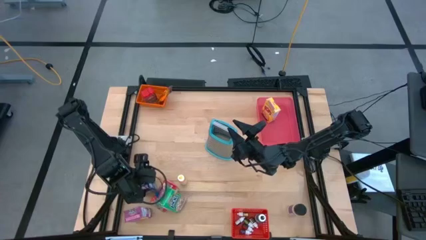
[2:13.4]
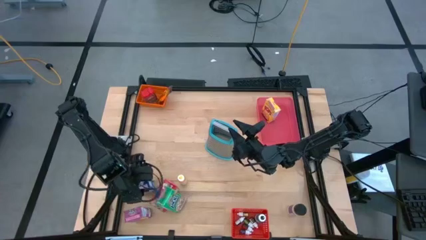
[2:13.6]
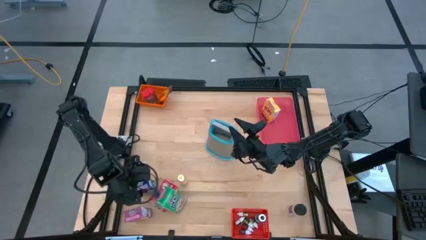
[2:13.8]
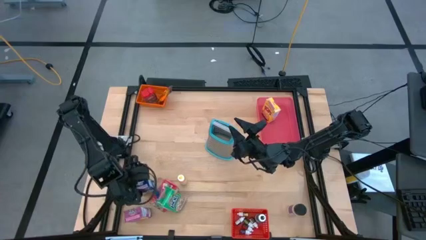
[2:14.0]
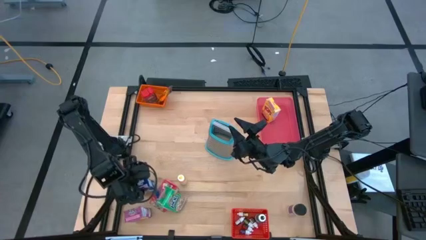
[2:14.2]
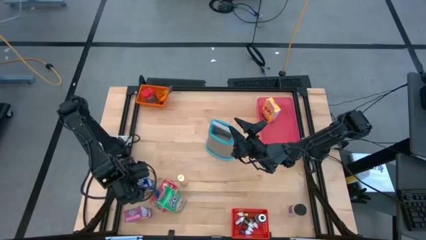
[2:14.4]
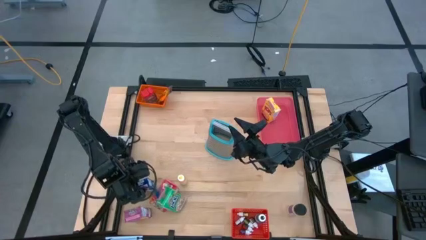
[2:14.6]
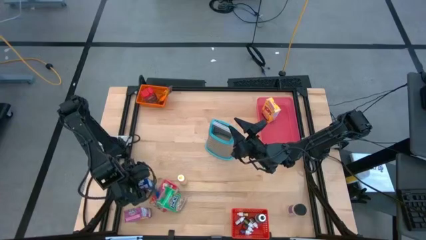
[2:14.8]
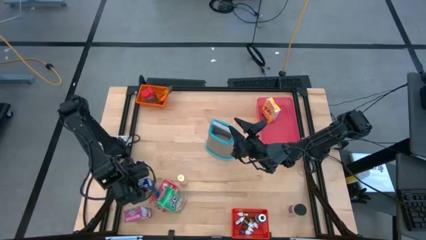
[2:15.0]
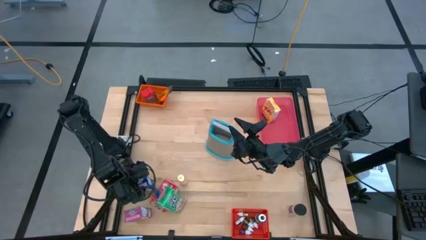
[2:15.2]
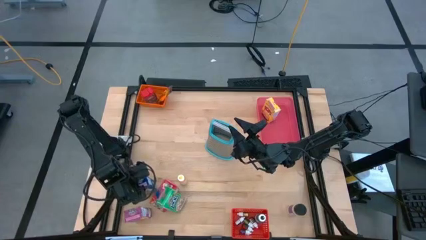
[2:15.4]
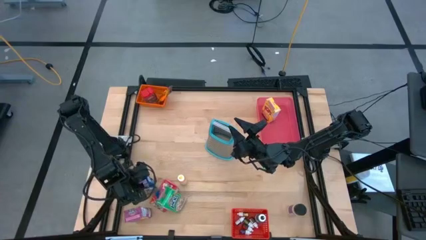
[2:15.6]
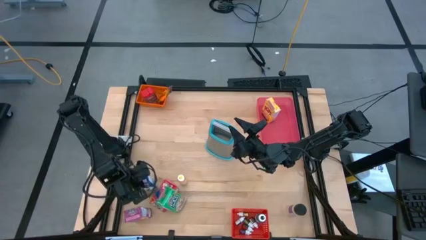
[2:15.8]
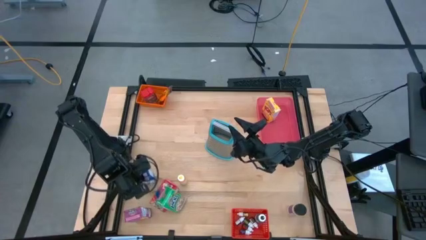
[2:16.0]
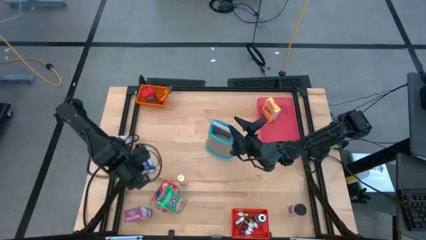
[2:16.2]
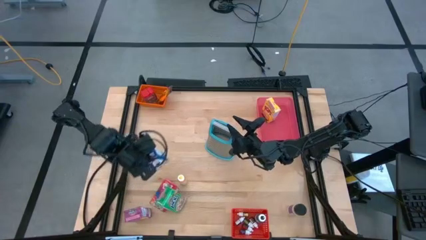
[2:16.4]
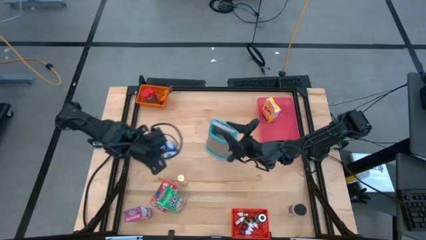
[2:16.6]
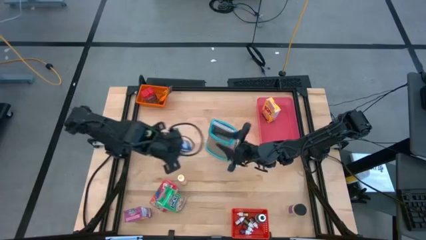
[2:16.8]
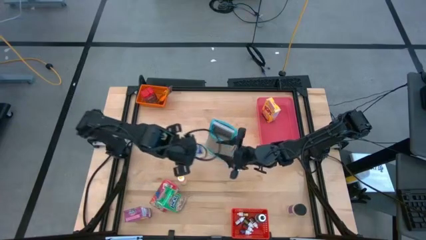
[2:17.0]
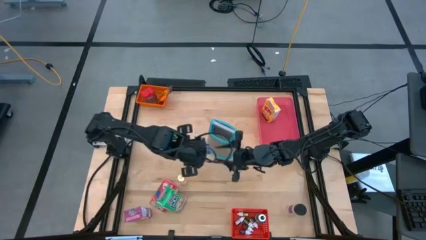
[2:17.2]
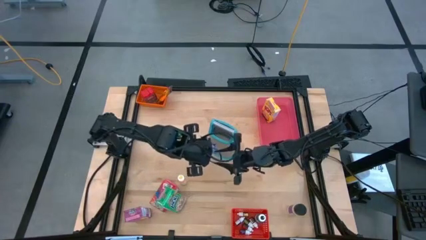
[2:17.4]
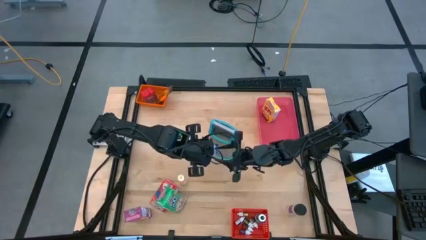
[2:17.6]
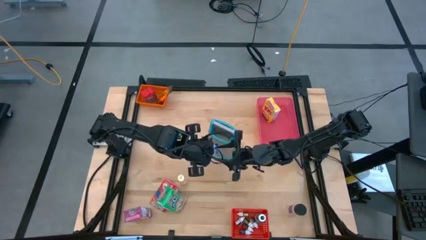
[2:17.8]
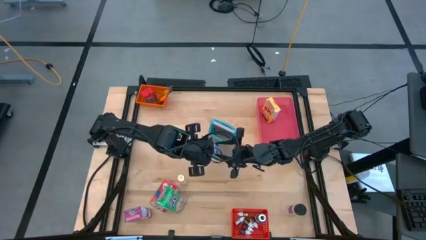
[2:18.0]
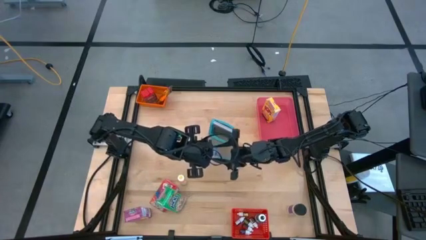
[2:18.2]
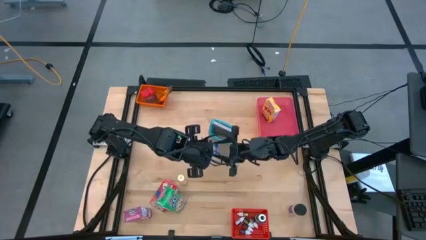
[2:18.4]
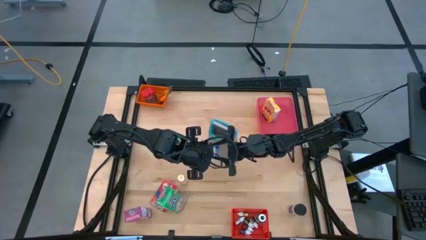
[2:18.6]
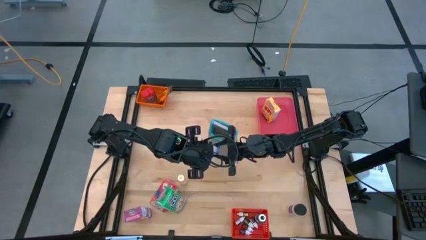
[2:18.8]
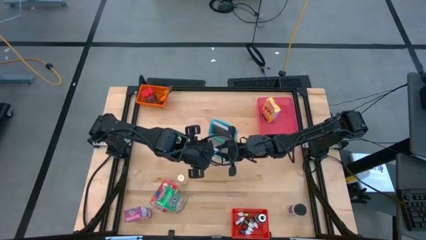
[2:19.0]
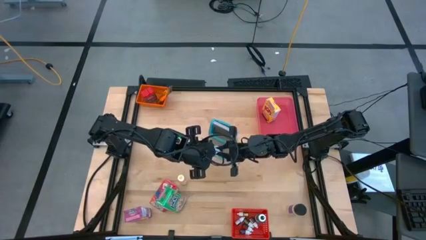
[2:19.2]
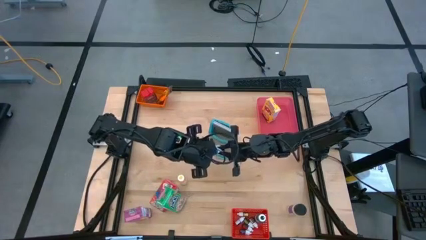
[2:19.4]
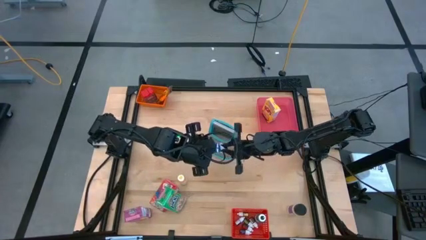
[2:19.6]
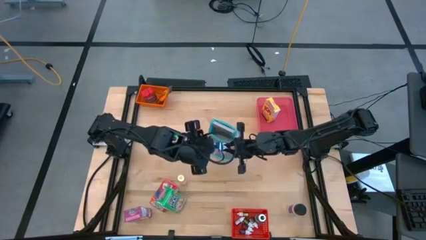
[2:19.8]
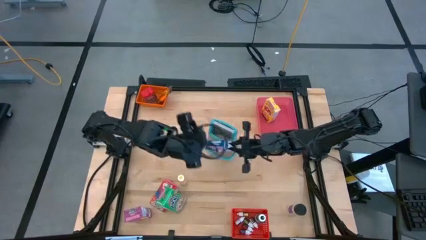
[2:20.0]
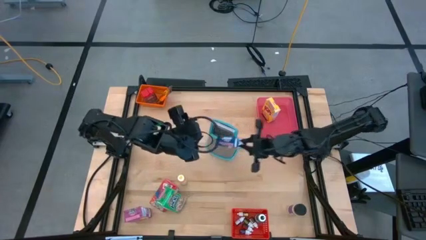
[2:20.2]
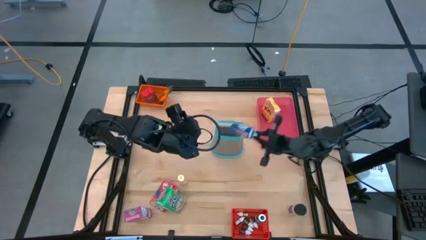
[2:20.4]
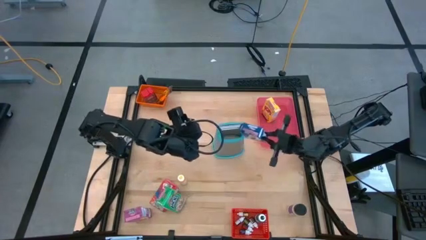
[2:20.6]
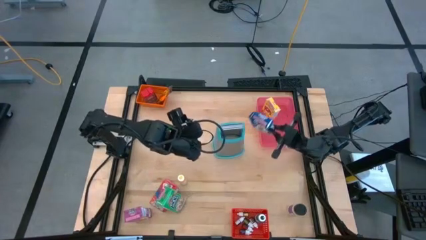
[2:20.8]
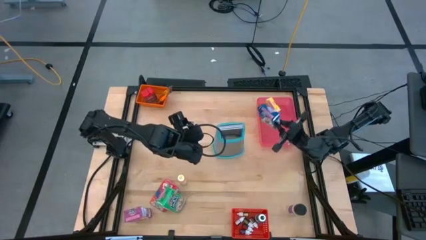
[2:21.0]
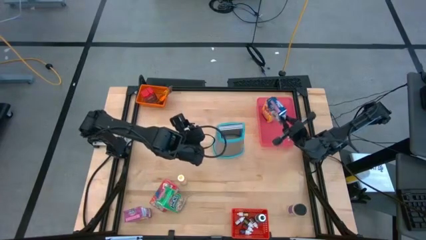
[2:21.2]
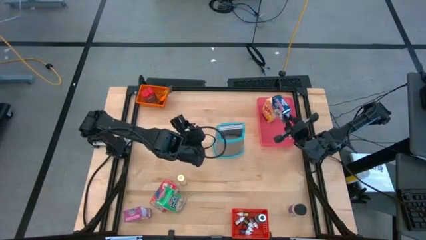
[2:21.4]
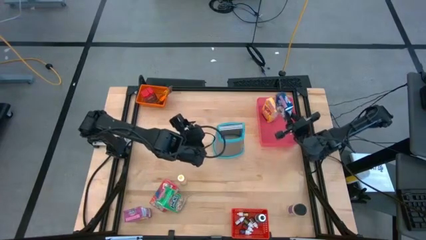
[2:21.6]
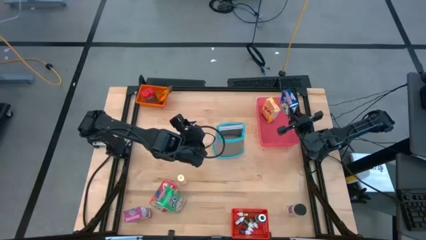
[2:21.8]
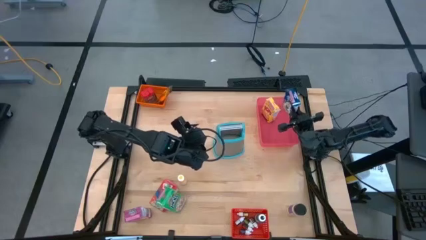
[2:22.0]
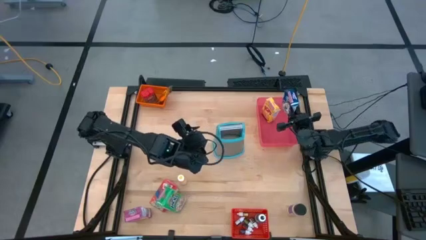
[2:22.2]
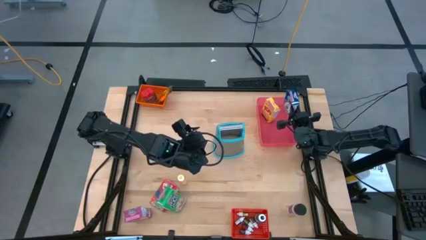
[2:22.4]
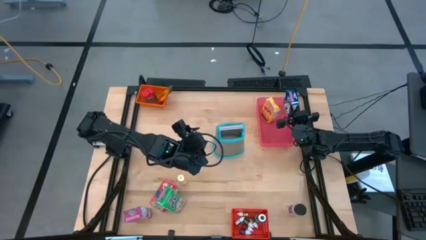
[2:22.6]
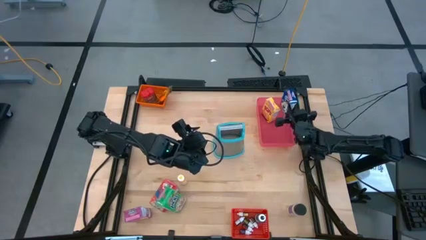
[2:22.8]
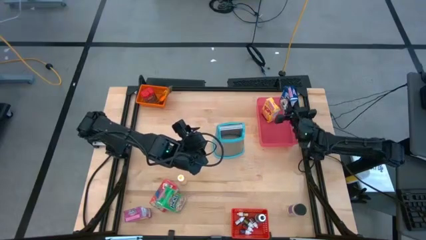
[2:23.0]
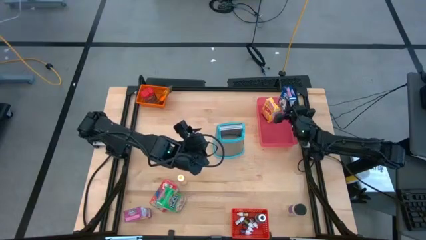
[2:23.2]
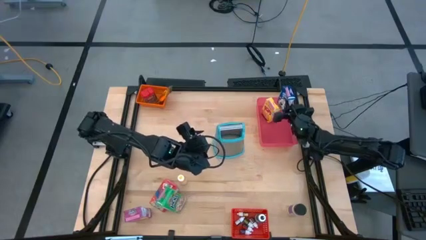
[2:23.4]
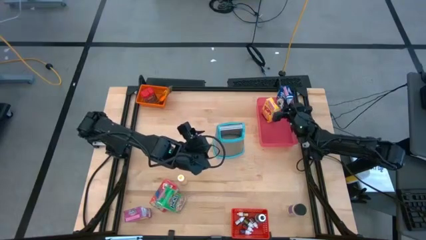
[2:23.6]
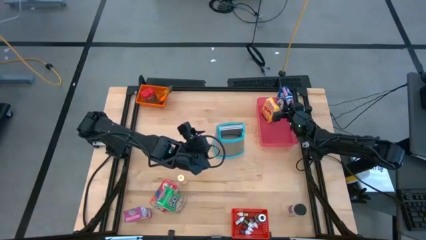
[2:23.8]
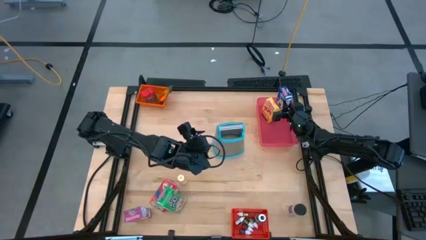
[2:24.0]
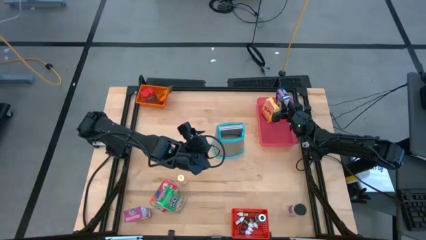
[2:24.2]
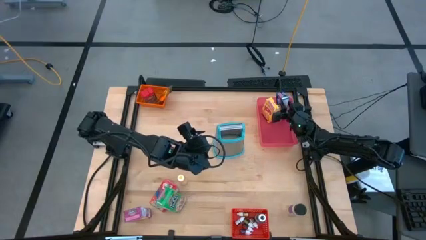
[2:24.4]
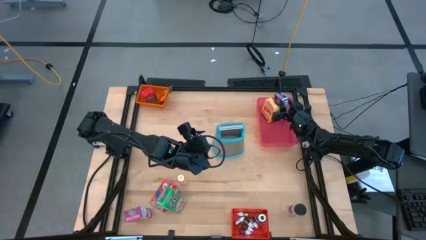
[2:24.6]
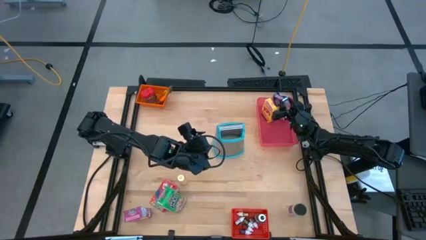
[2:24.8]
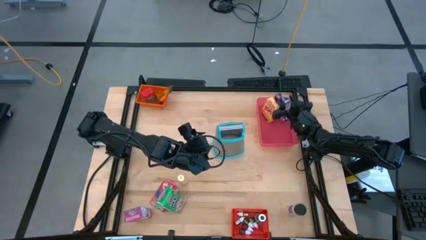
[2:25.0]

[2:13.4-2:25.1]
Task: Pick & Place Kitchen Items
Put the blue cereal box into the pink bin

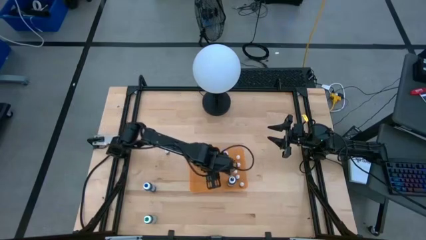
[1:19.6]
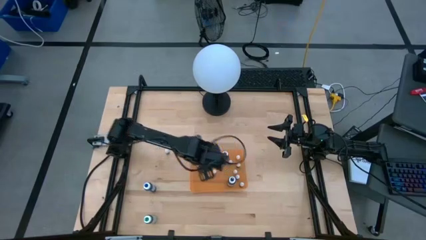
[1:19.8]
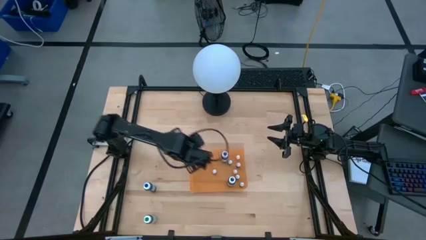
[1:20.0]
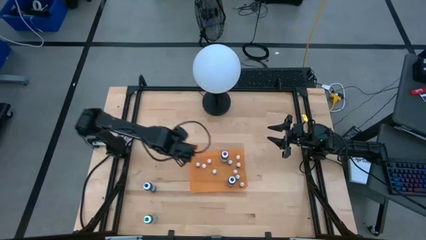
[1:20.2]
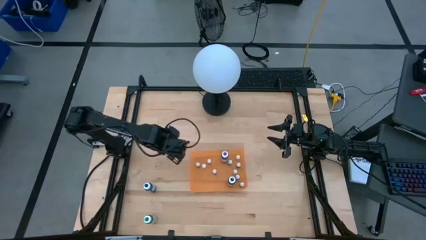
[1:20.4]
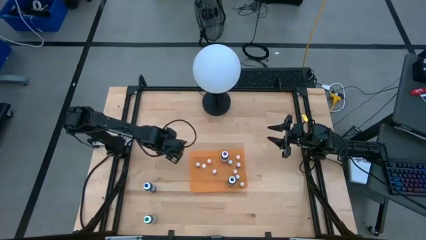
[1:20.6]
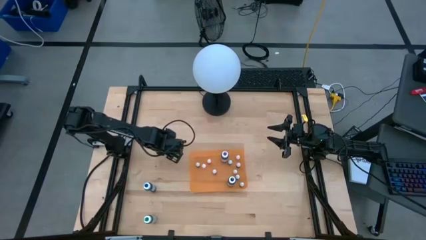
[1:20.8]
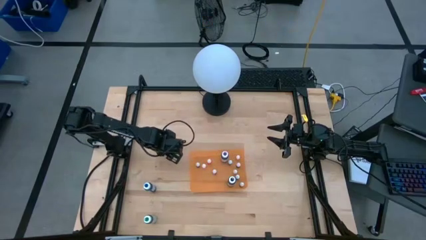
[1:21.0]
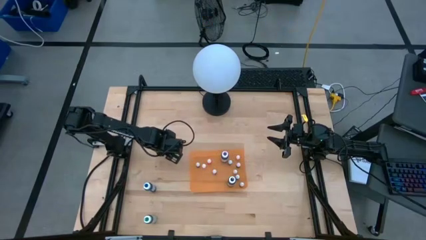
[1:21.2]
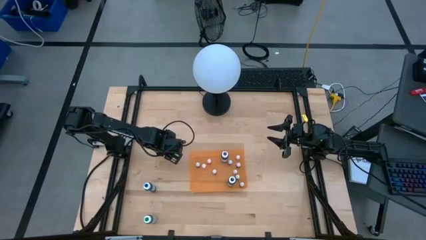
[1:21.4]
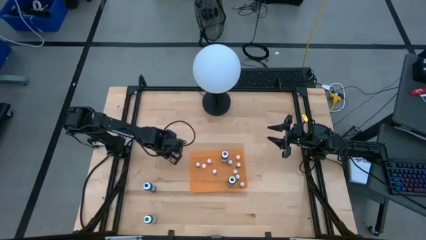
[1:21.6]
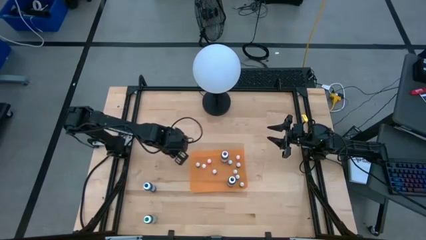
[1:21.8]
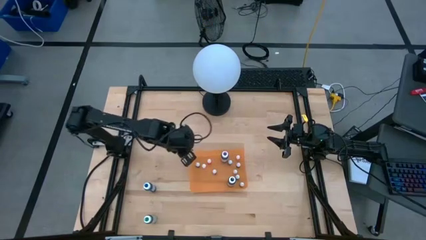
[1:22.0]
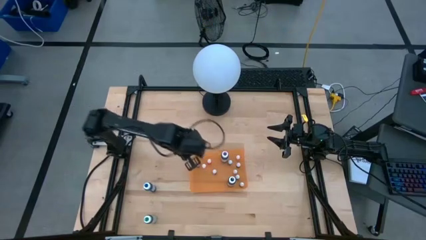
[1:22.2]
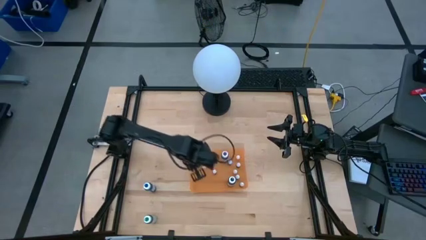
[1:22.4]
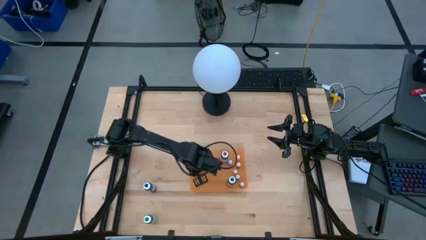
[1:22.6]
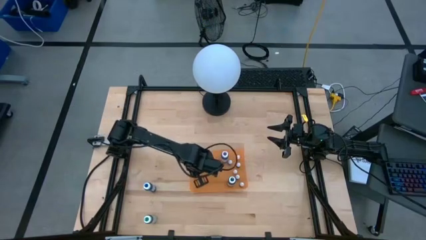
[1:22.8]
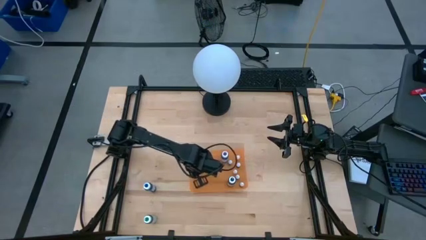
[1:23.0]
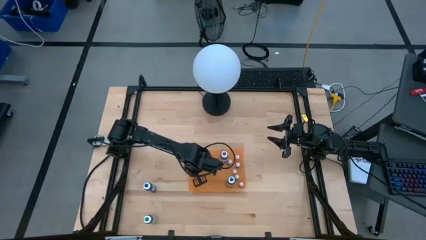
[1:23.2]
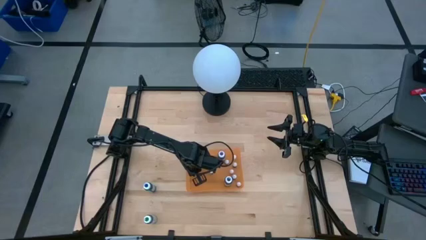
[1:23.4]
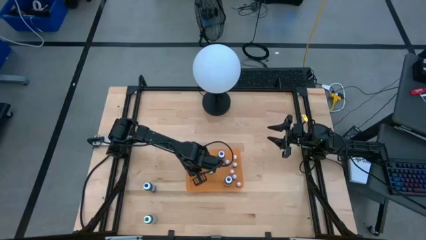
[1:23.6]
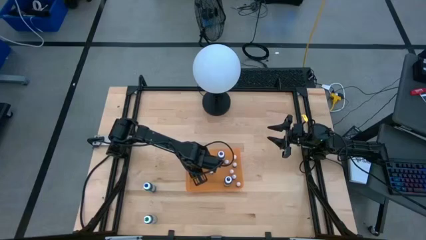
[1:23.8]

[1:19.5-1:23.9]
Task: Pick & Place food coloring
Put the small purple food coloring bottle into the orange container
